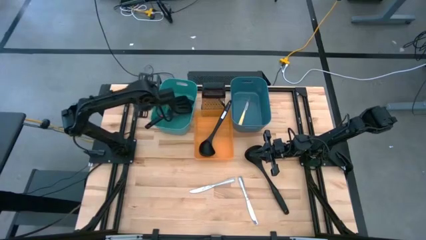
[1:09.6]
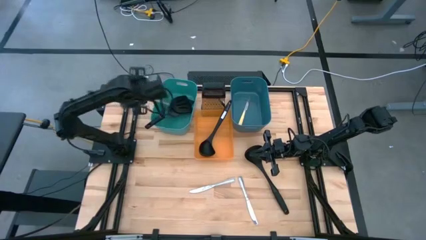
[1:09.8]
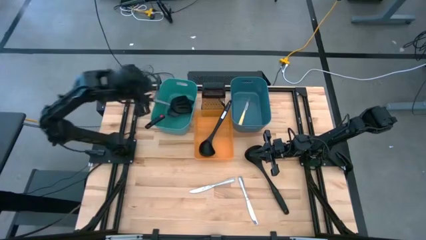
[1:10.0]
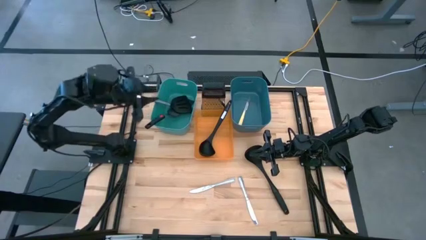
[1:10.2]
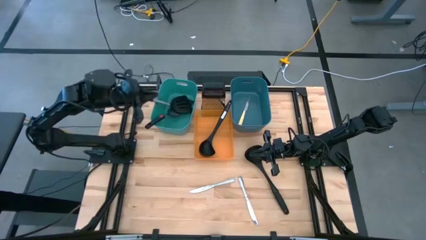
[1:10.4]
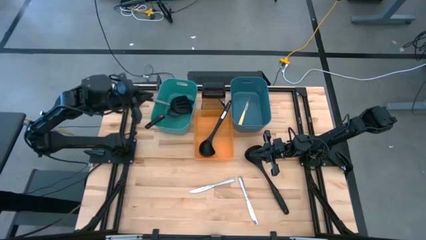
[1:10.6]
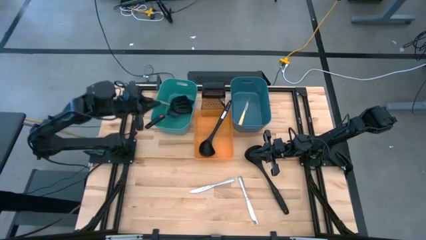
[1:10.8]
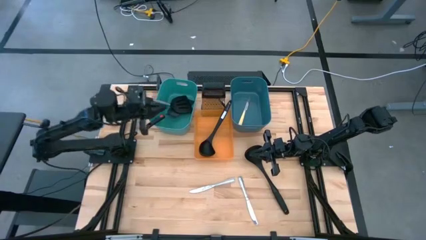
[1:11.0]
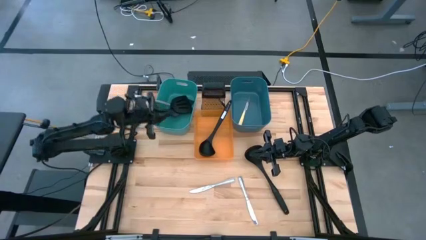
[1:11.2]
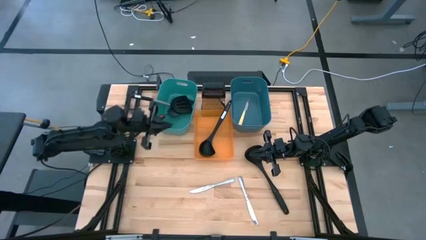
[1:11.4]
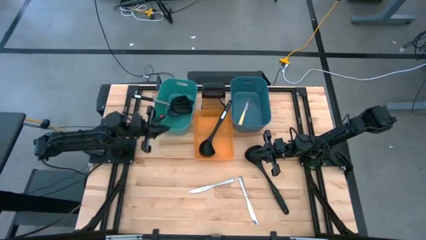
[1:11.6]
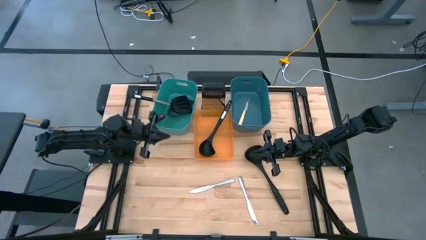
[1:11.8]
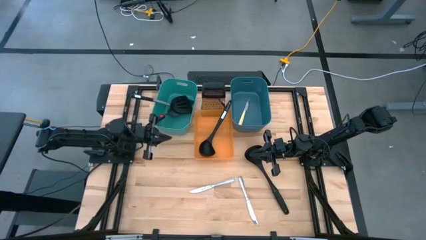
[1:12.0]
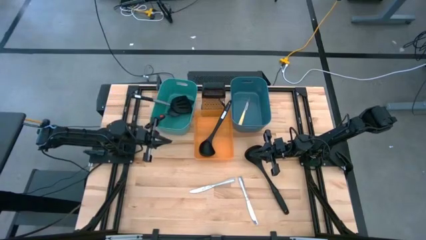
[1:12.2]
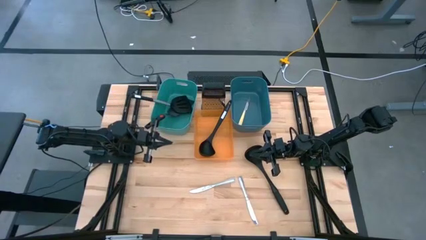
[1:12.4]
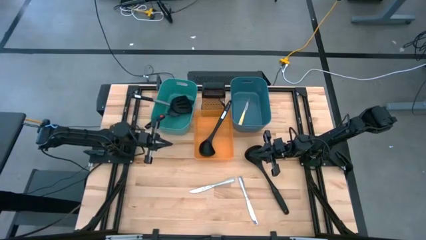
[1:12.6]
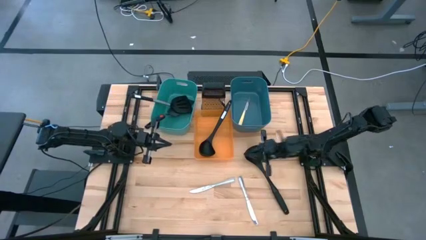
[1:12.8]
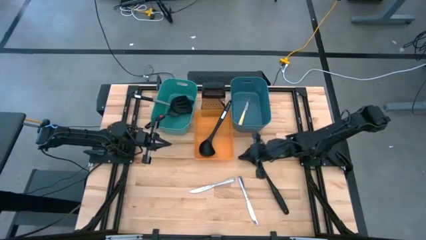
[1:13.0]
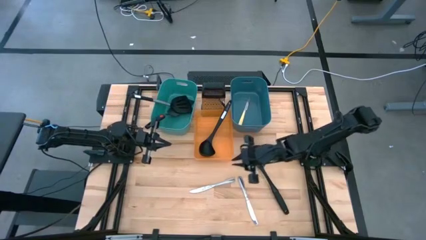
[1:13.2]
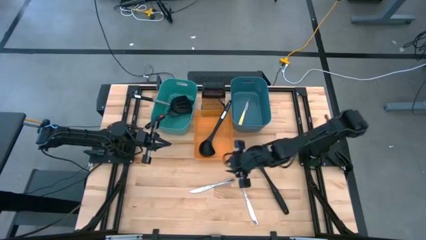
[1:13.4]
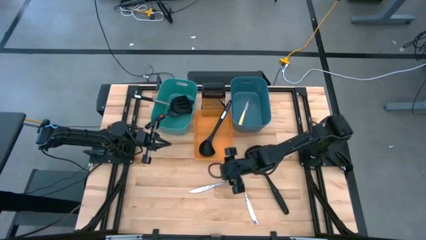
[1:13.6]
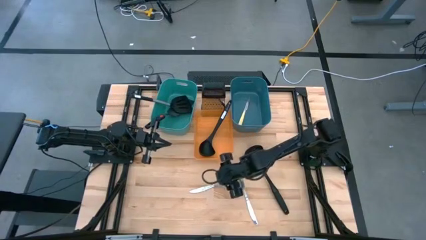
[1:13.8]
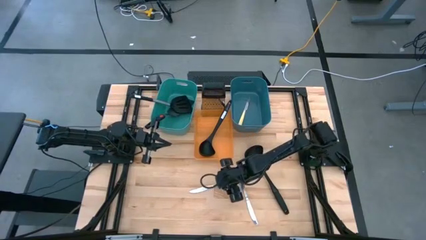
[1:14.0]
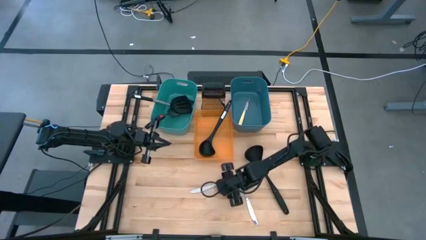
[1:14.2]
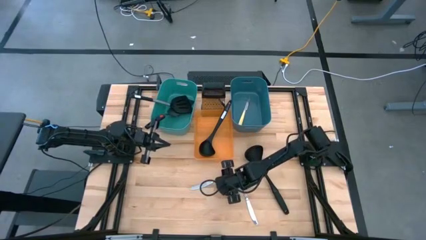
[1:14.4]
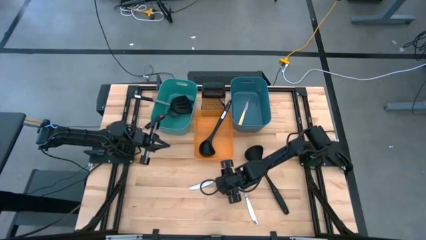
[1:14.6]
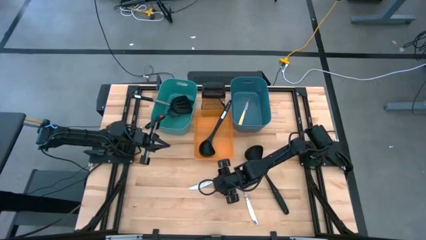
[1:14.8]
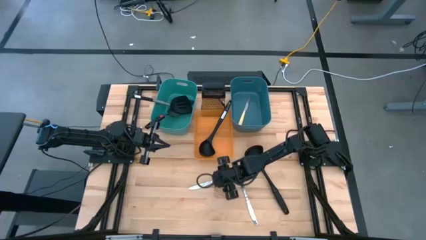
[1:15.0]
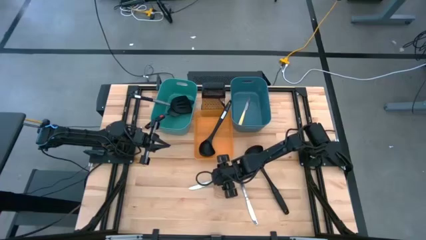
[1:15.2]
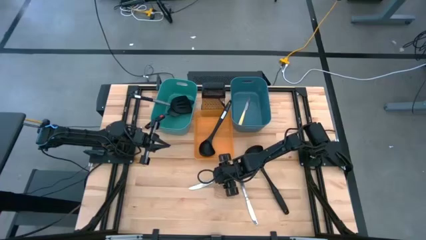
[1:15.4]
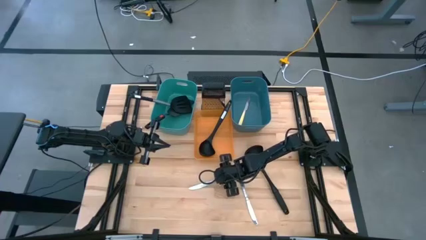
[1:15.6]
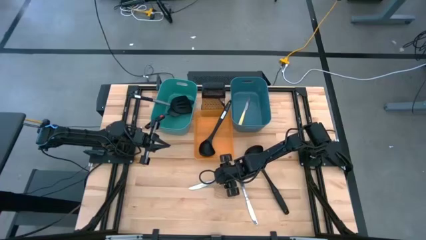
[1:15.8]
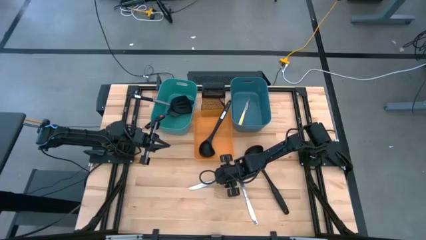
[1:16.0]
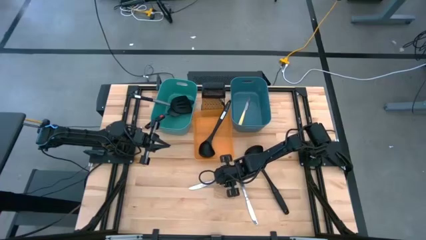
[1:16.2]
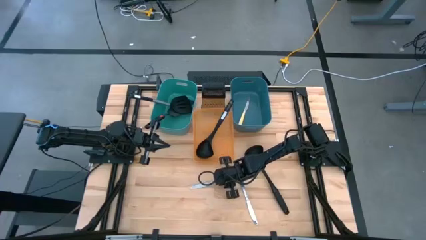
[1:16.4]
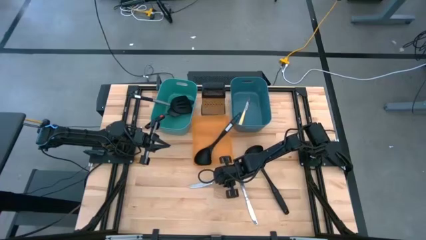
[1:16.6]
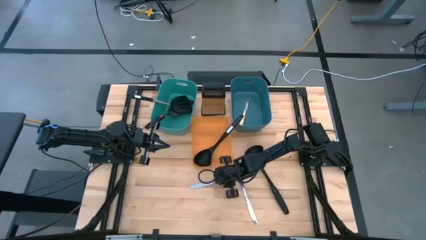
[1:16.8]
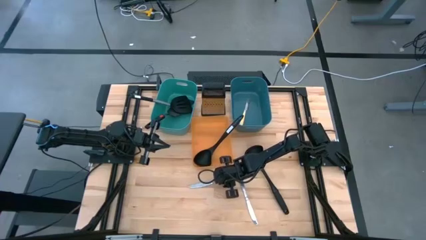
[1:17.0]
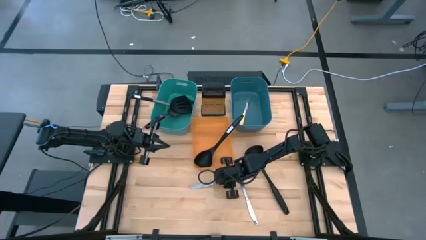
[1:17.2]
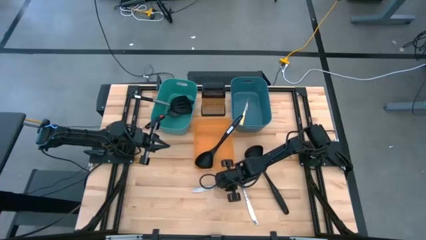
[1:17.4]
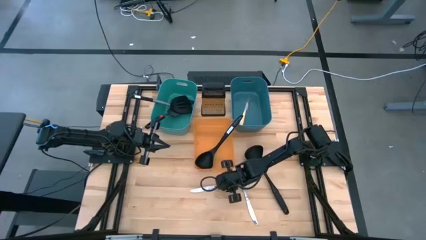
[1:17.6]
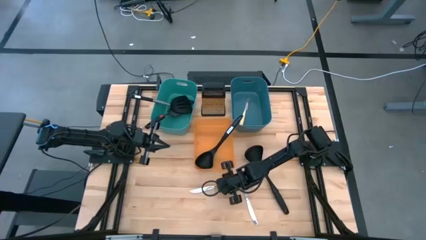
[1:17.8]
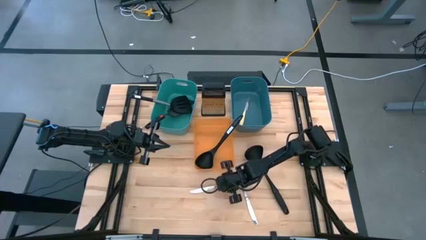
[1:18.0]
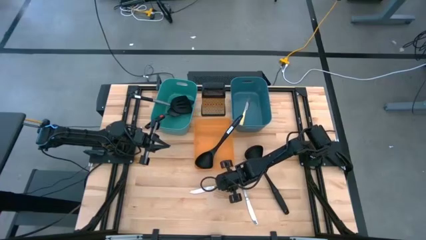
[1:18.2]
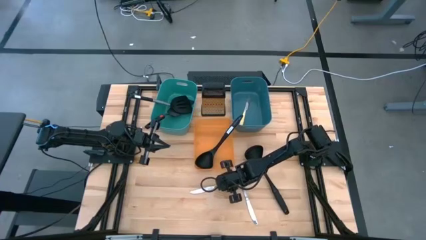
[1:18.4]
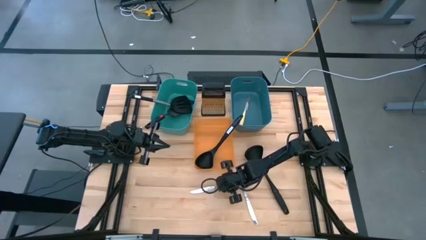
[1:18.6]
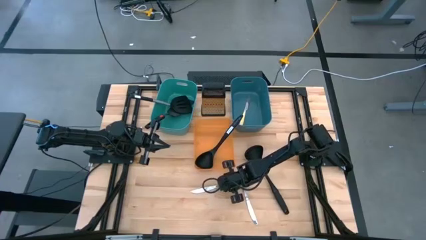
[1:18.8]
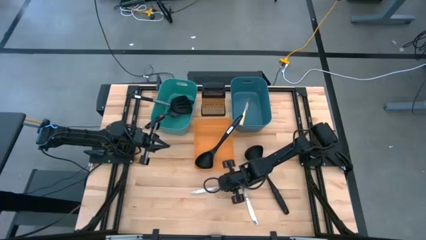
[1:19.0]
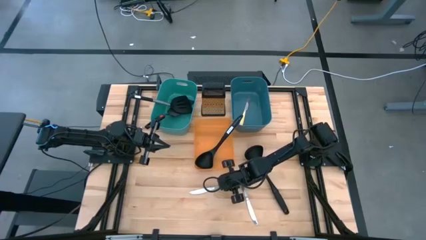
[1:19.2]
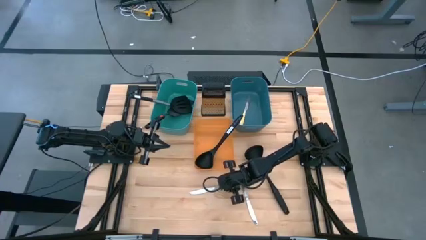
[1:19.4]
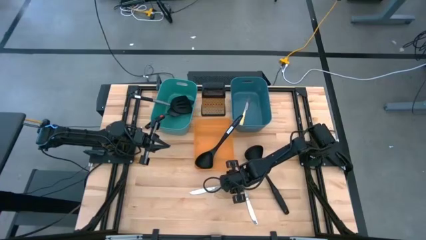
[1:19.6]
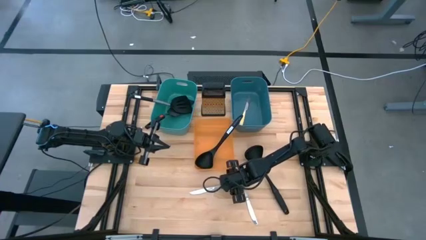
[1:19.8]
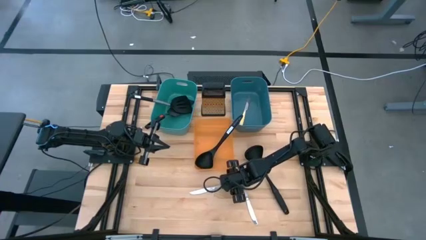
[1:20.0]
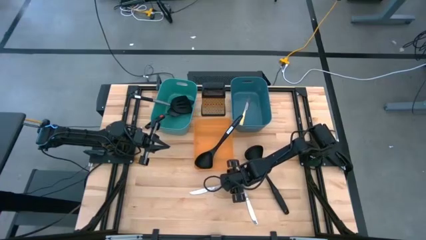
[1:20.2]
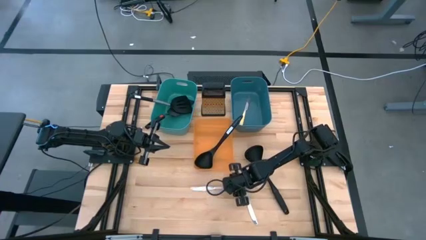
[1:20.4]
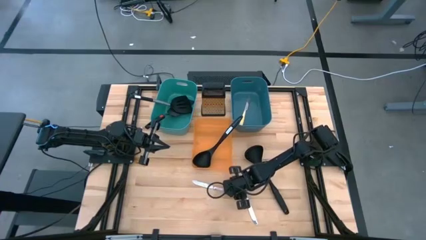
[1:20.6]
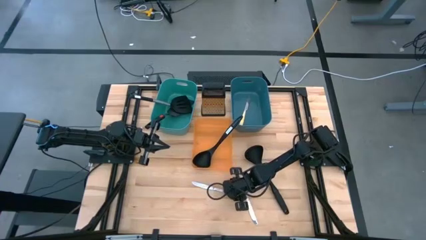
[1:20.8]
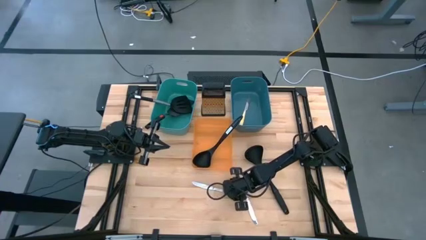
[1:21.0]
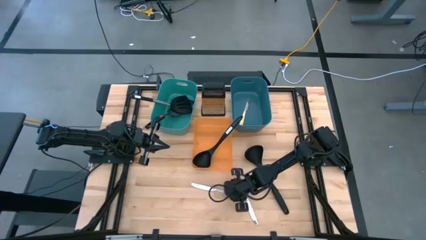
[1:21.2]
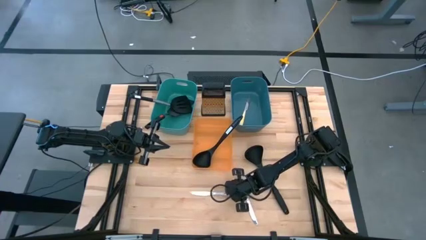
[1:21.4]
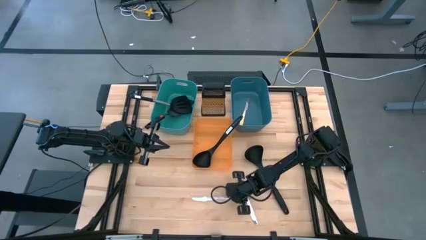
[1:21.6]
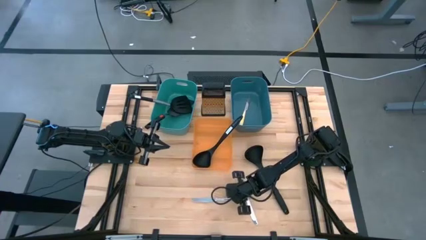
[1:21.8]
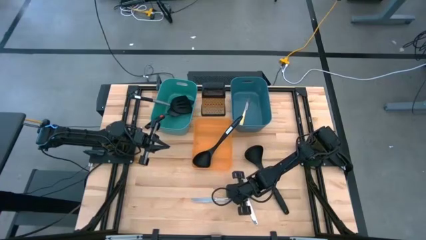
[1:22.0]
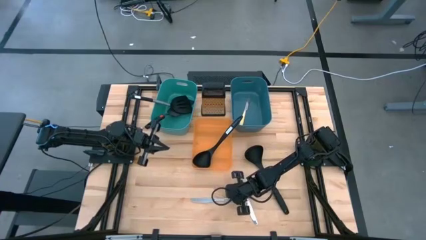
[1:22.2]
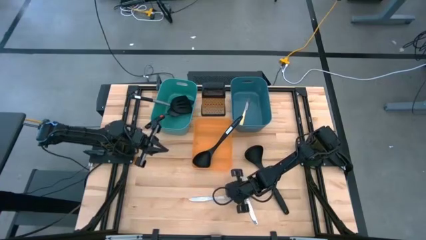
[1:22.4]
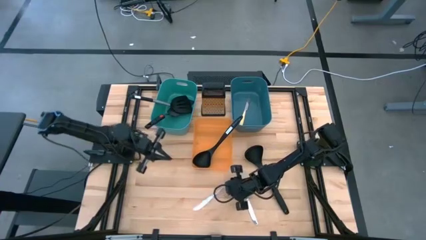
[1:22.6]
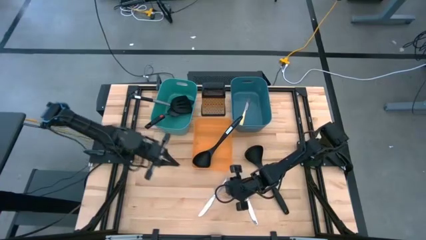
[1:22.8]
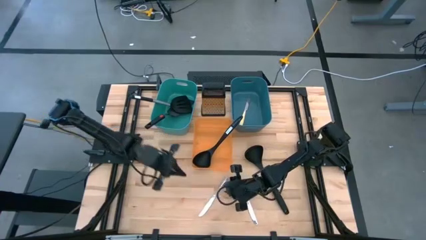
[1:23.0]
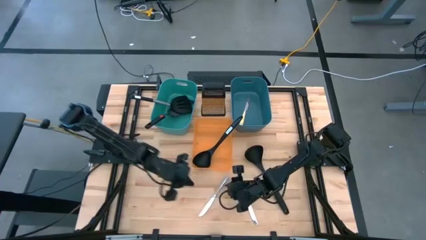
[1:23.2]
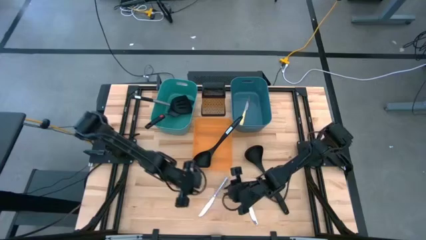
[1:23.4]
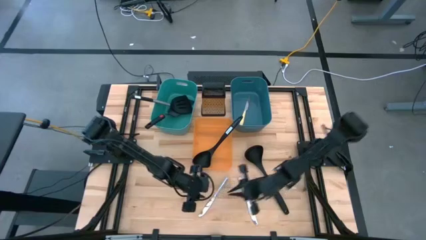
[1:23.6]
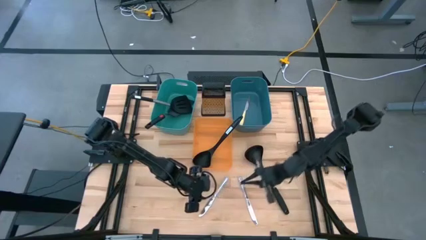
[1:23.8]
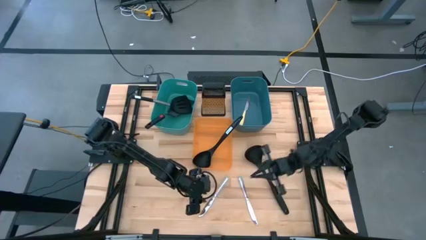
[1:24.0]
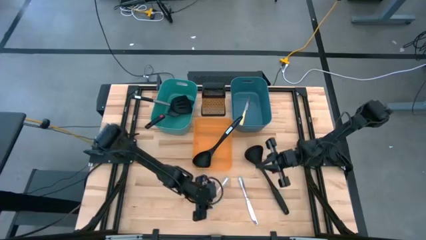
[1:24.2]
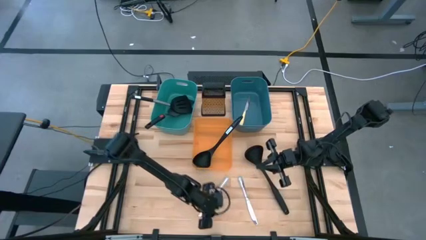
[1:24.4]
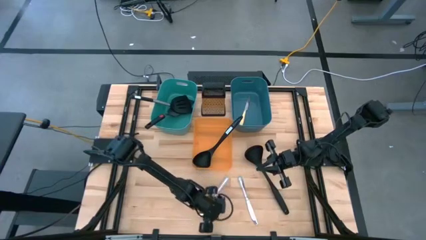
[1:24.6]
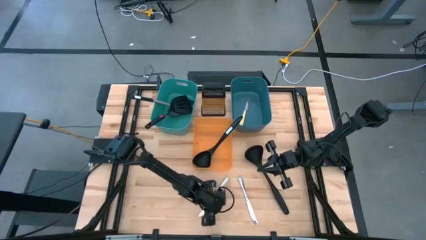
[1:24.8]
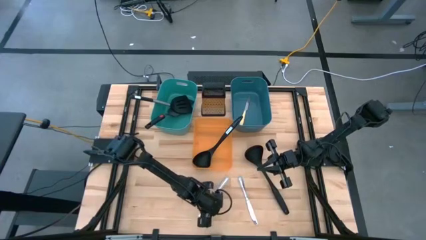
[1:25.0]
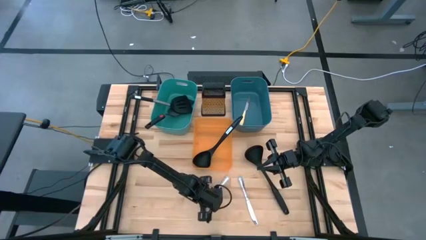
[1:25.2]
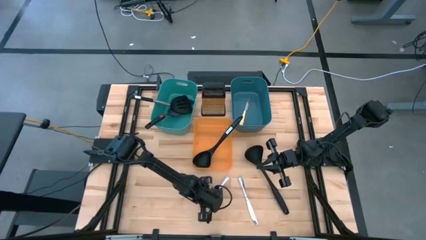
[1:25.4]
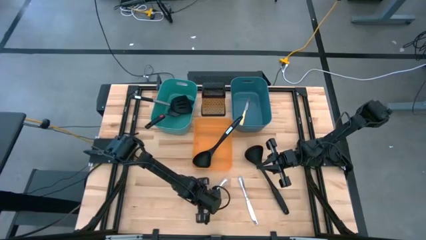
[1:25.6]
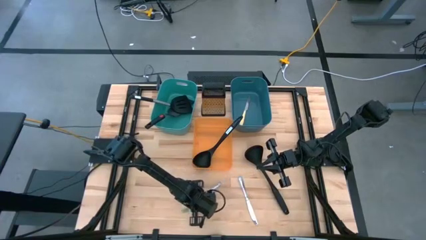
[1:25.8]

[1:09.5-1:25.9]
Task: Pick & Place Kitchen Items
Put the left silver knife into the blue bin
